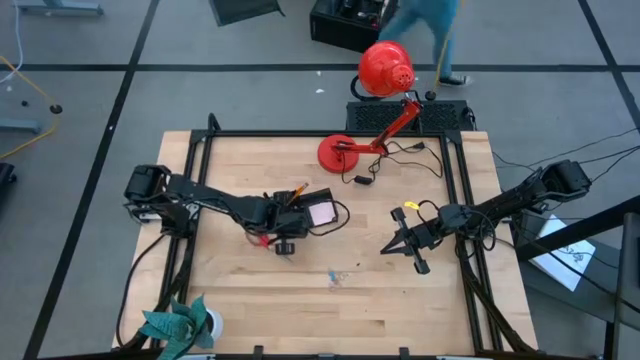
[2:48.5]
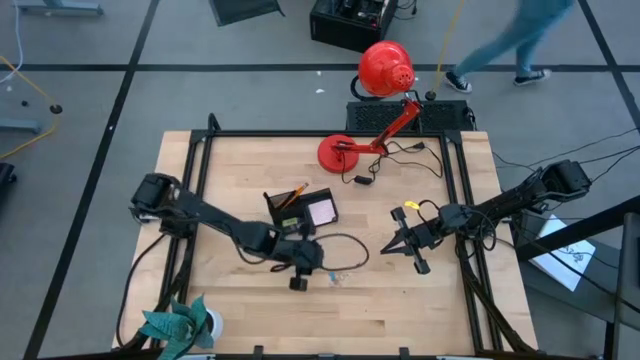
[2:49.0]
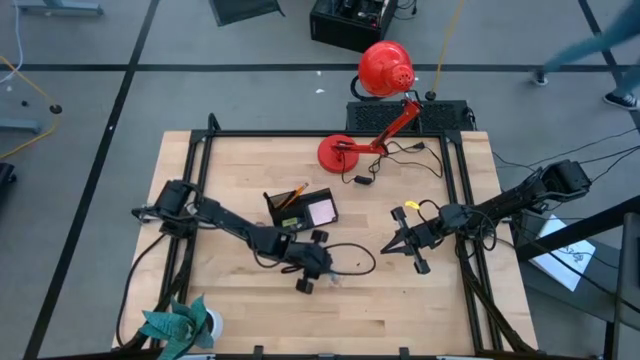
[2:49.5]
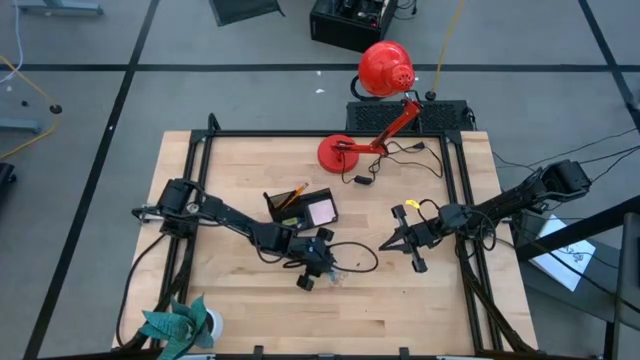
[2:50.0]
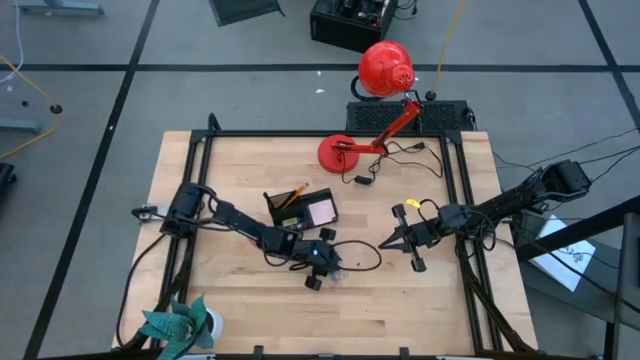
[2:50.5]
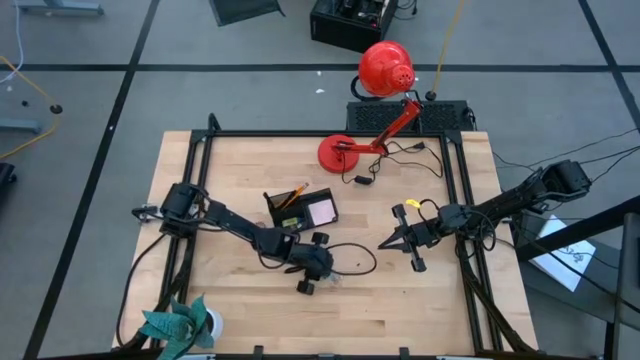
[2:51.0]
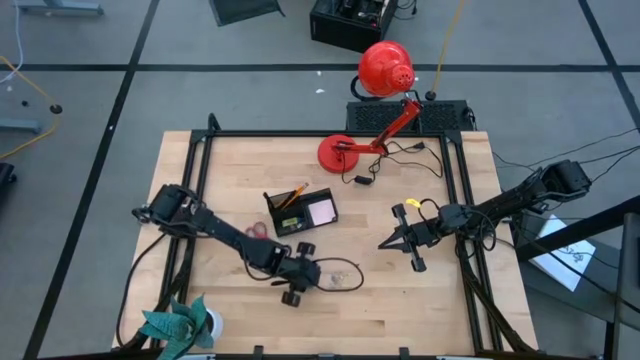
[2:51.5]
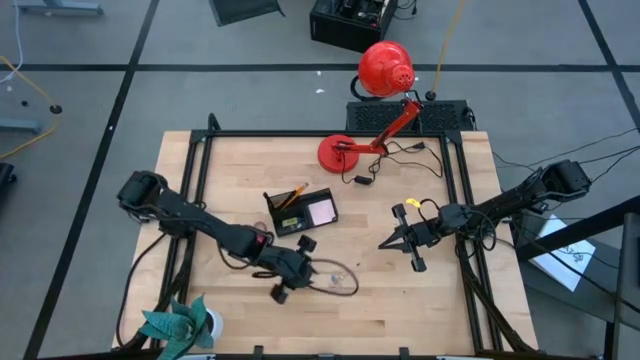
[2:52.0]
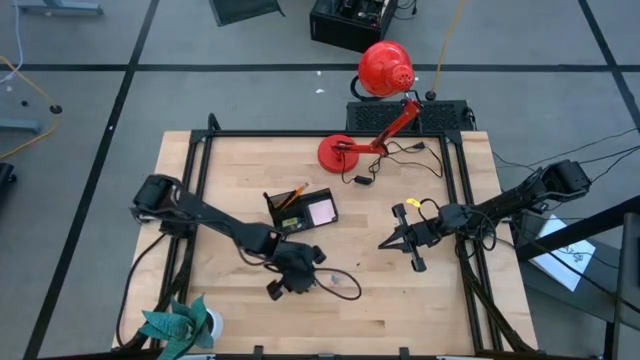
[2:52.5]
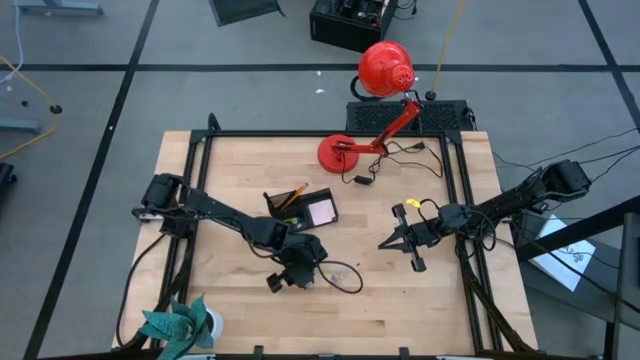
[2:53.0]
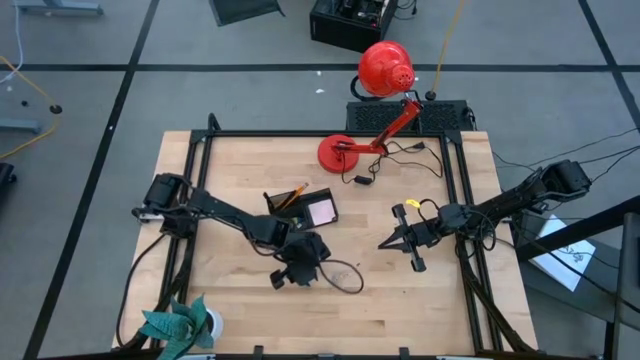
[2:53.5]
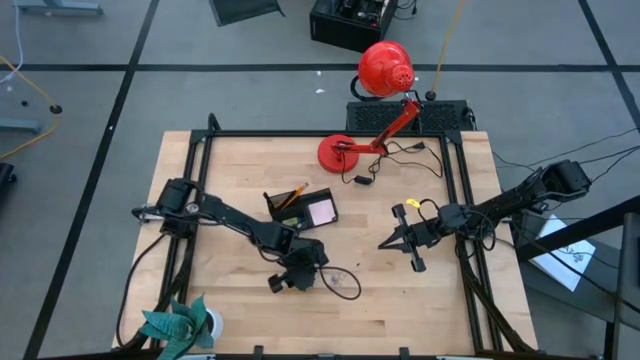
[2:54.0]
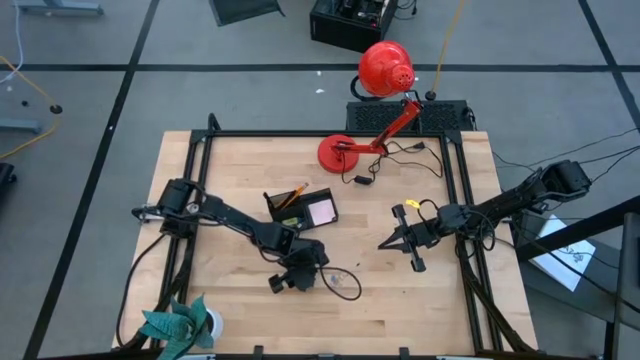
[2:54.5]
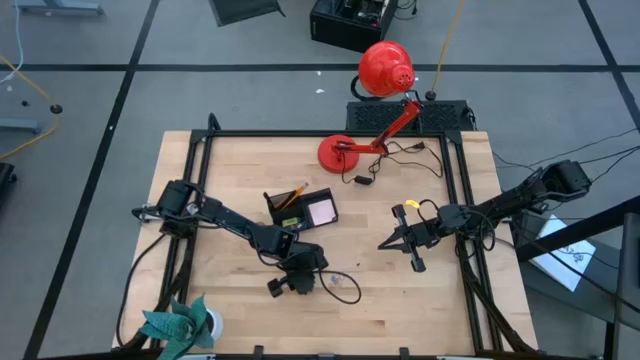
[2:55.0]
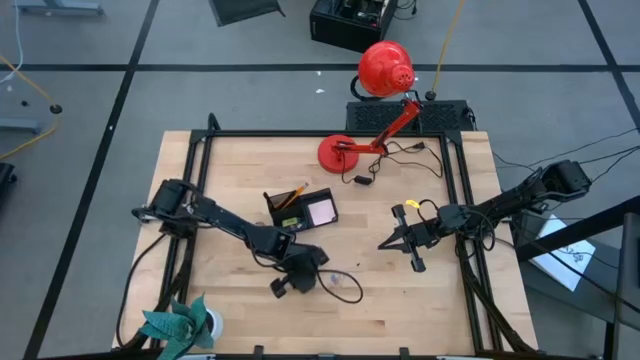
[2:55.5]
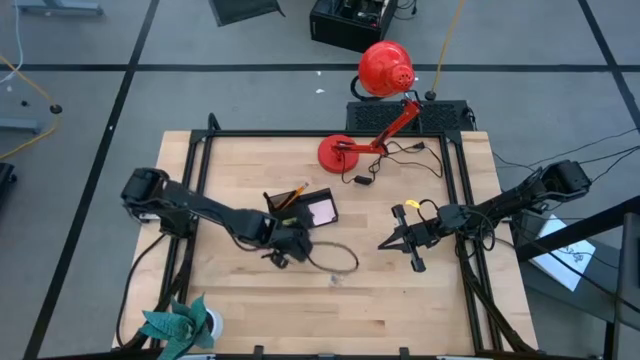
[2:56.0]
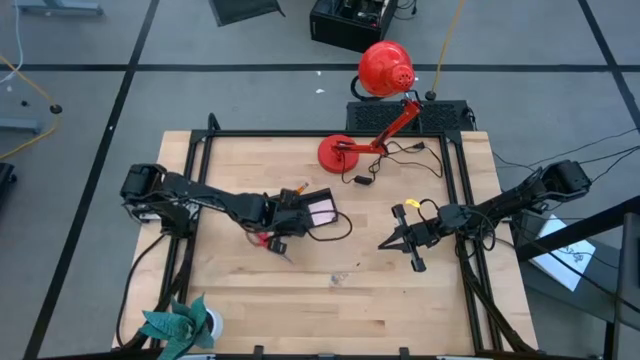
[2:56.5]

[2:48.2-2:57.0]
Task: Pick and place office supplies into organizer
Put the blue binder clip into the mesh desk organizer

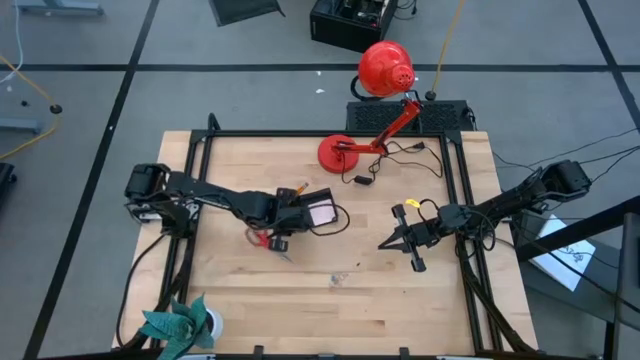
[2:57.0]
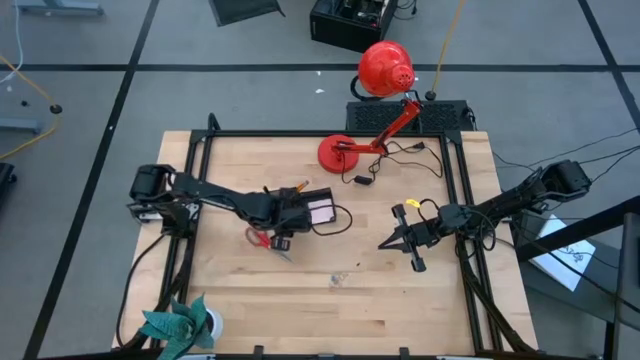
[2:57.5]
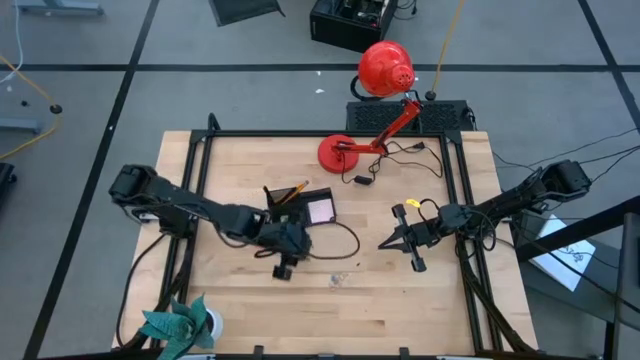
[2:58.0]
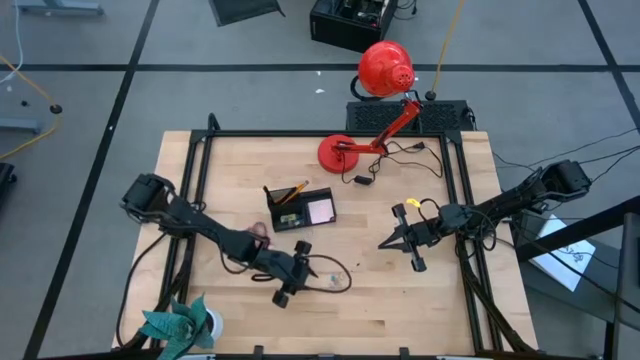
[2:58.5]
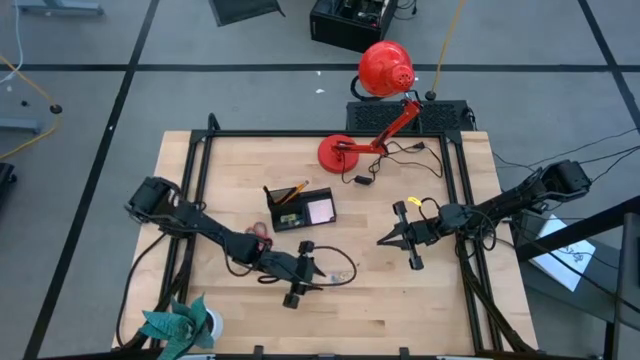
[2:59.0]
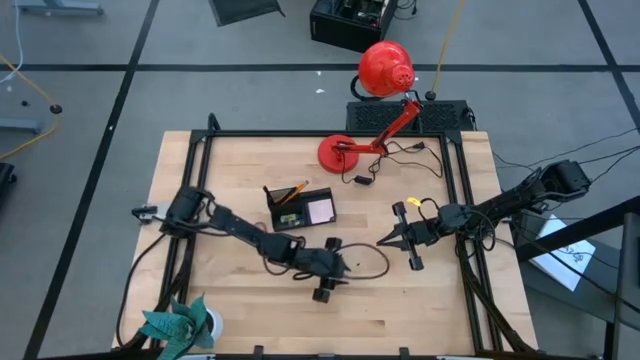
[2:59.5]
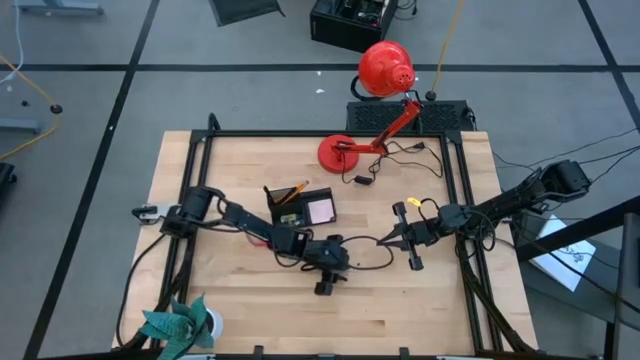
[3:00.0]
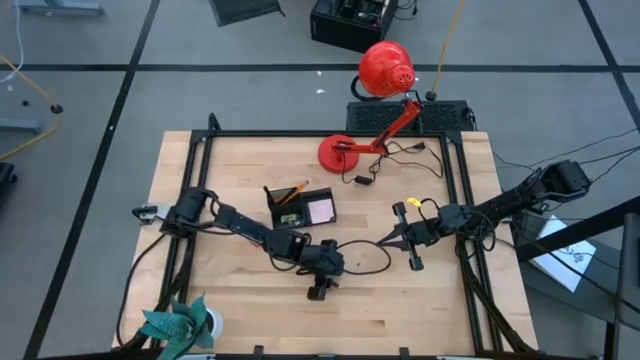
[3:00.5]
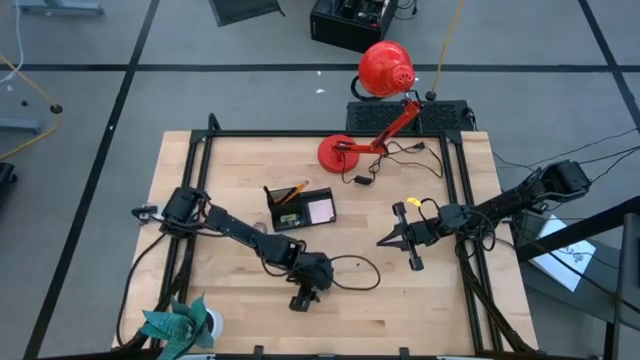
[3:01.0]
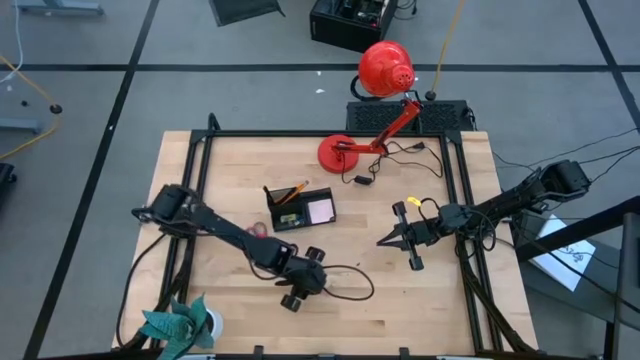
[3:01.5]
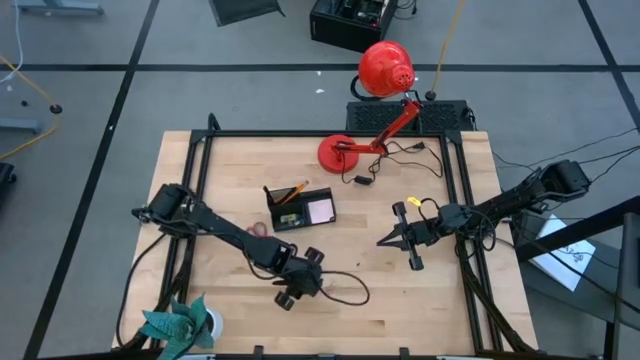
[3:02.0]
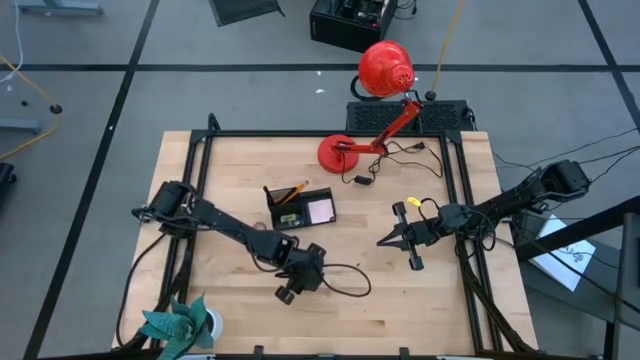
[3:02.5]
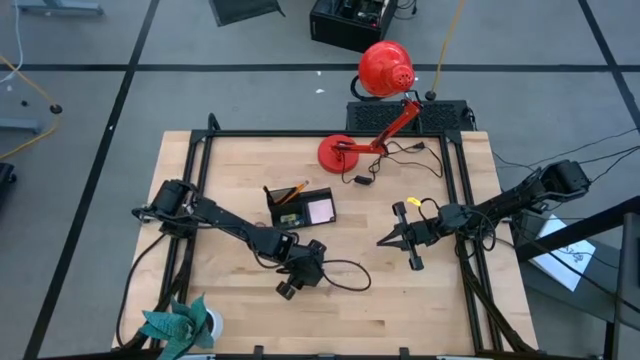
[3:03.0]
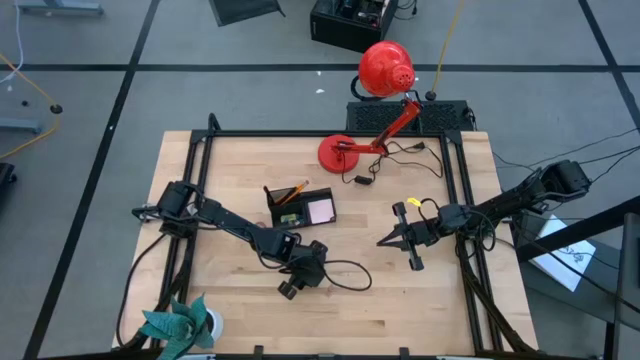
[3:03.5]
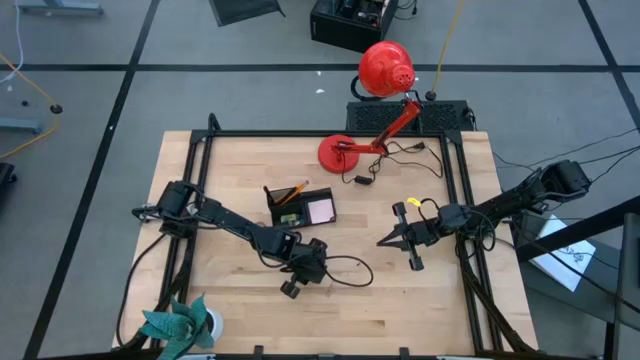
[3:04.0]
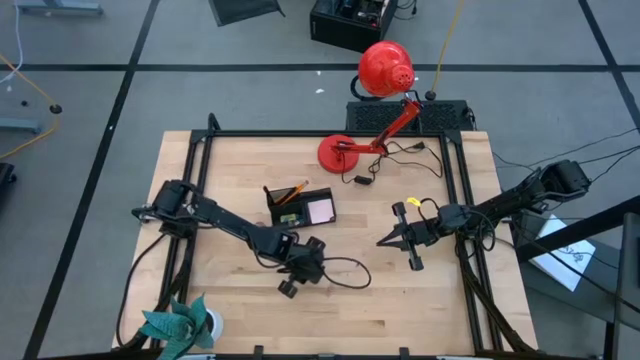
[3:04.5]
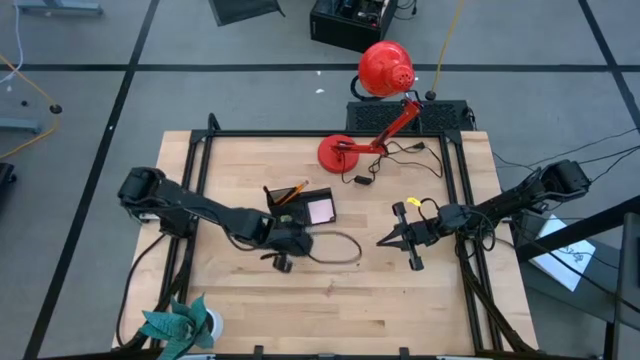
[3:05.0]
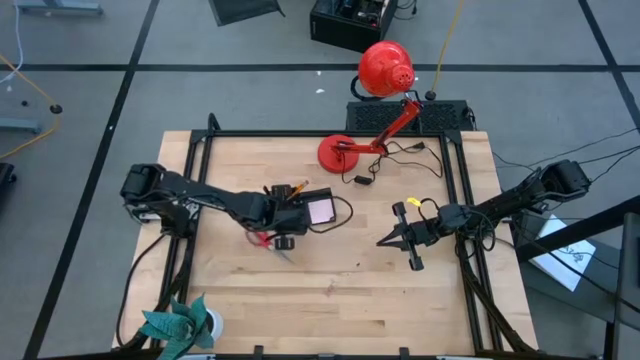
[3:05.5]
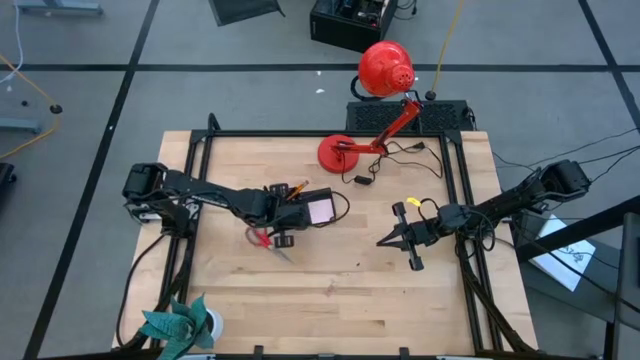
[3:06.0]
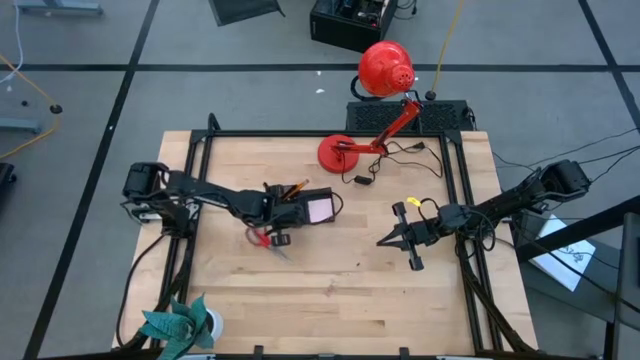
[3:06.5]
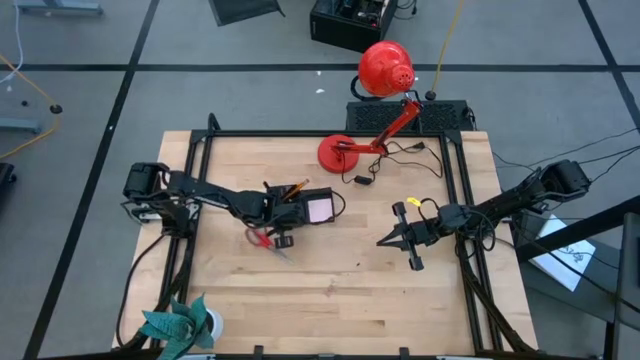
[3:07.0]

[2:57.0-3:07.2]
Put the blue binder clip into the mesh desk organizer

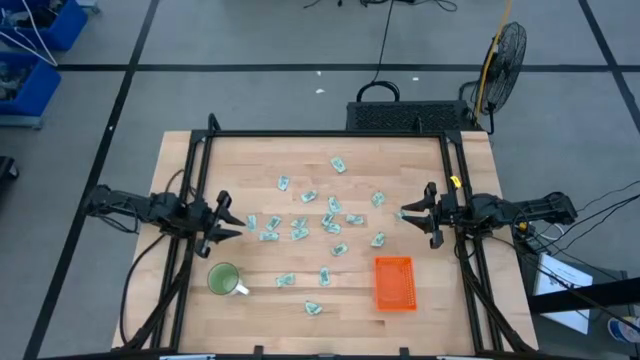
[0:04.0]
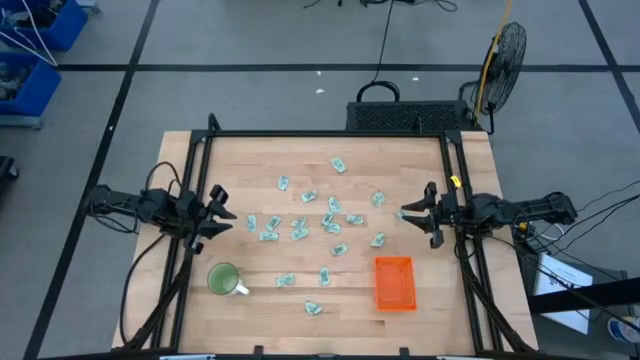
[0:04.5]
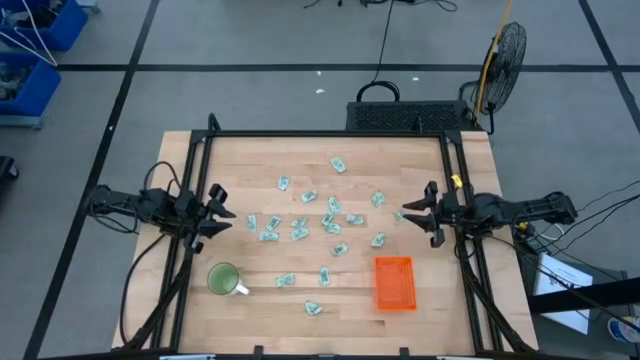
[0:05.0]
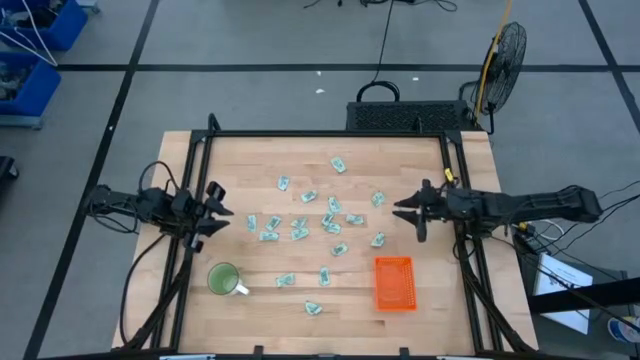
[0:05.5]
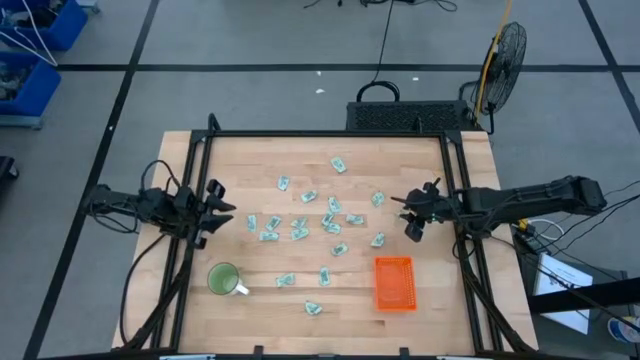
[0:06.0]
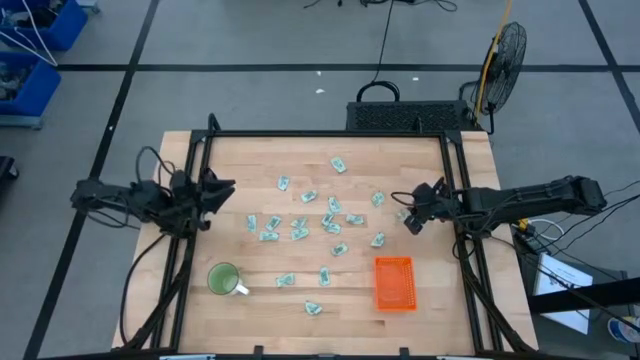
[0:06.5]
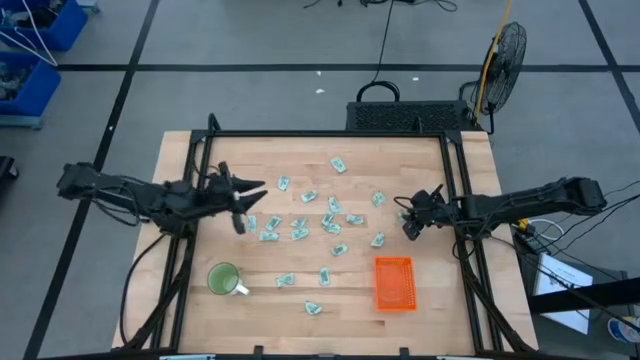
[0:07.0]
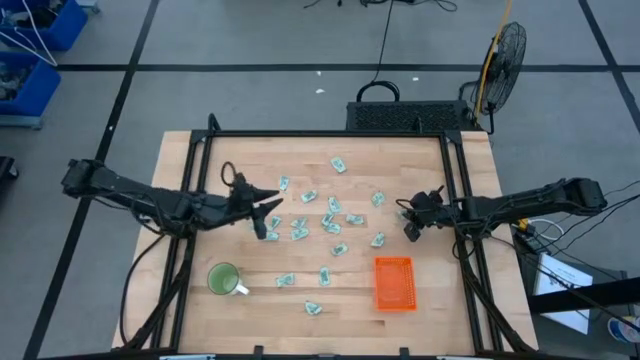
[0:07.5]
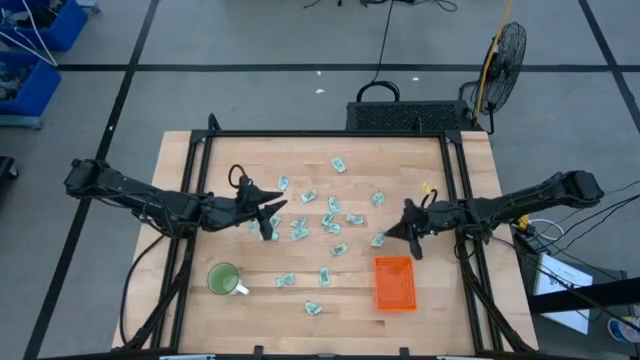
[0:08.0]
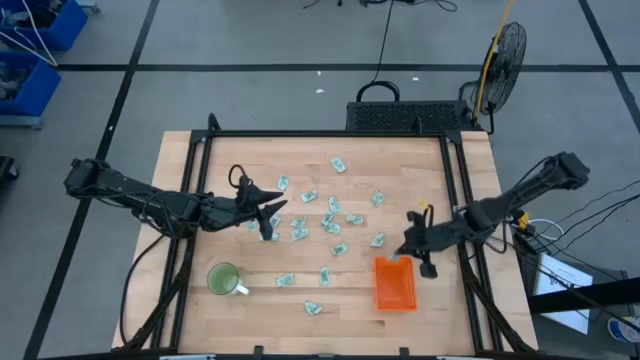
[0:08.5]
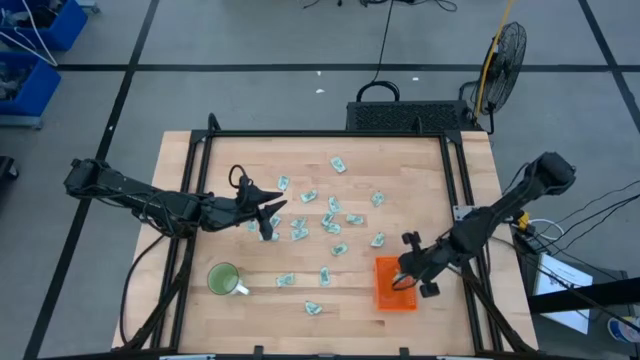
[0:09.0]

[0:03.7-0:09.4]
Task: Pick and place Stevia / Truvia into bins
Put the stevia packet into the orange basket
